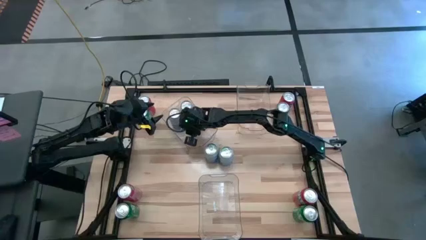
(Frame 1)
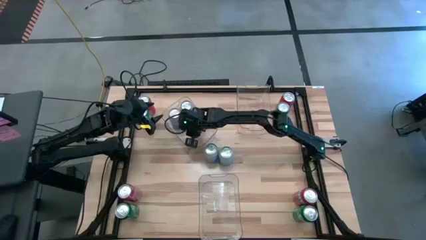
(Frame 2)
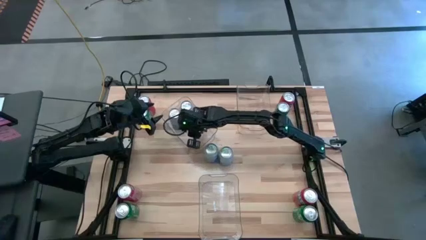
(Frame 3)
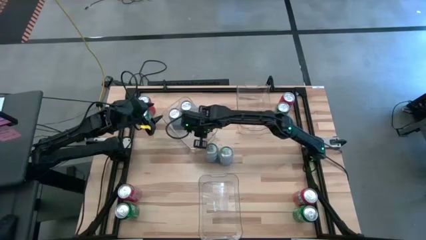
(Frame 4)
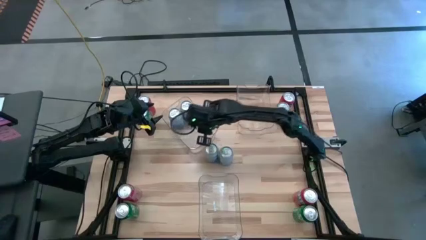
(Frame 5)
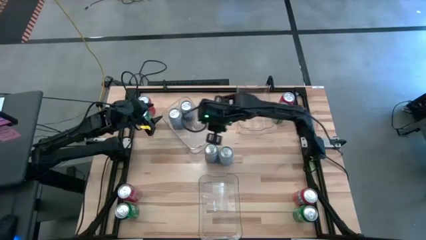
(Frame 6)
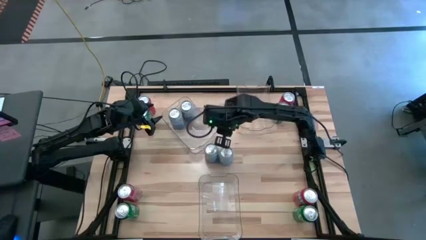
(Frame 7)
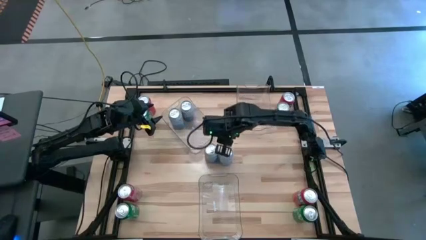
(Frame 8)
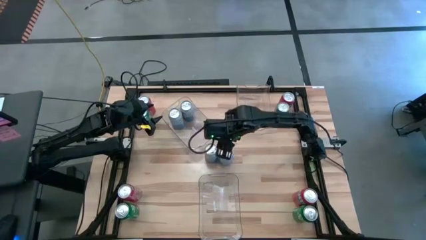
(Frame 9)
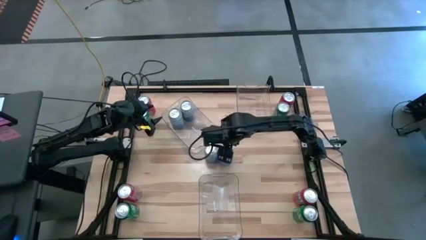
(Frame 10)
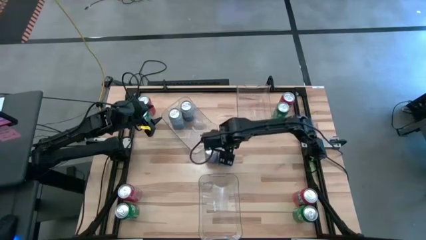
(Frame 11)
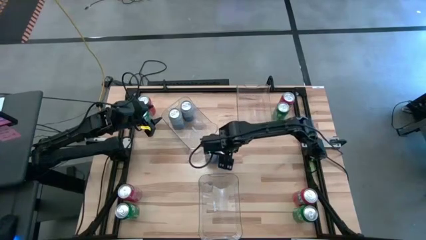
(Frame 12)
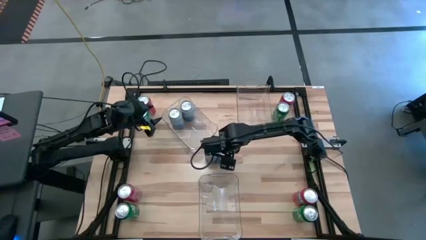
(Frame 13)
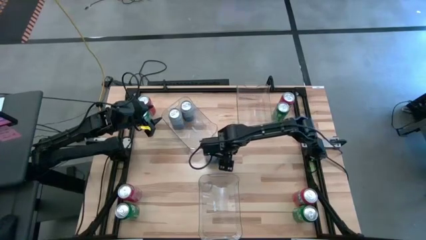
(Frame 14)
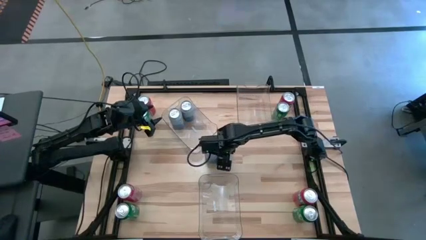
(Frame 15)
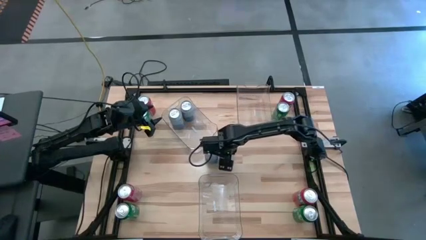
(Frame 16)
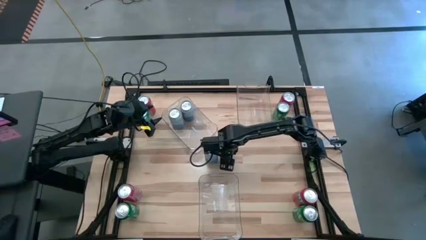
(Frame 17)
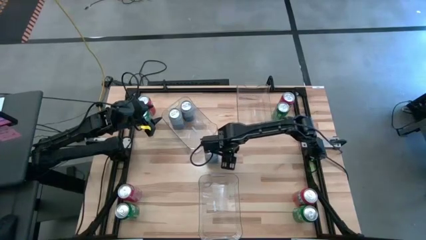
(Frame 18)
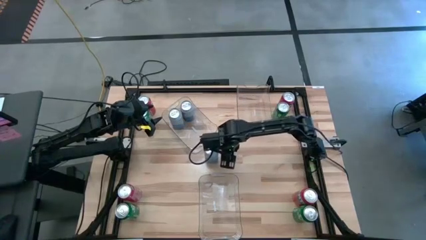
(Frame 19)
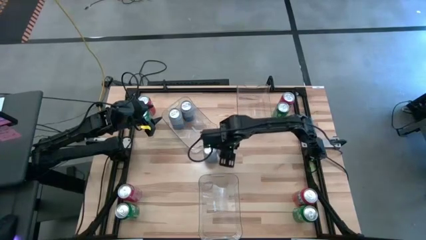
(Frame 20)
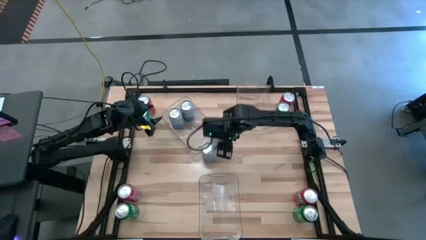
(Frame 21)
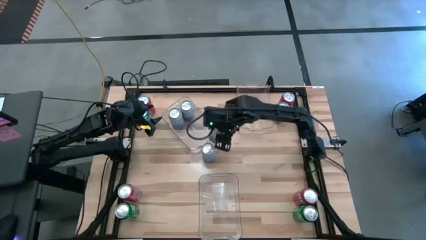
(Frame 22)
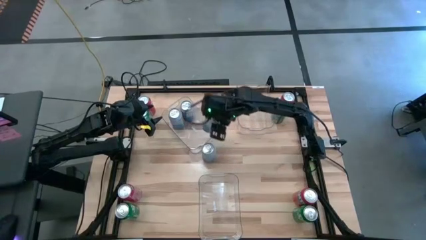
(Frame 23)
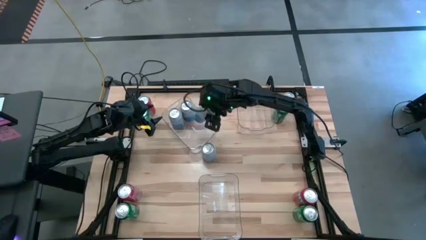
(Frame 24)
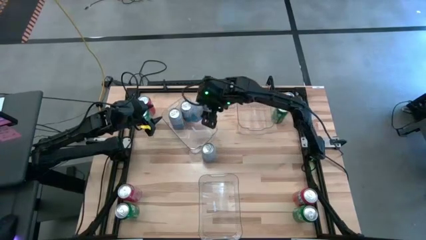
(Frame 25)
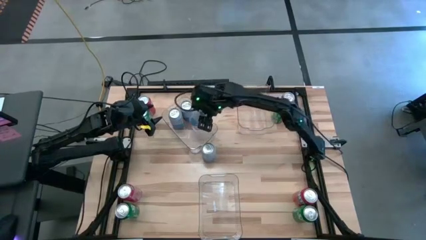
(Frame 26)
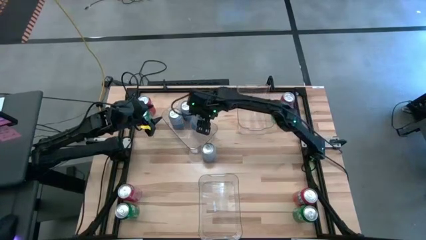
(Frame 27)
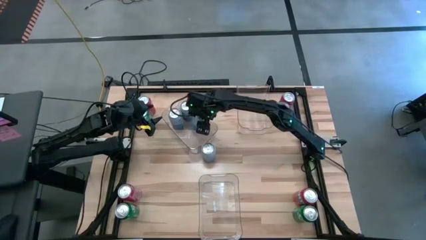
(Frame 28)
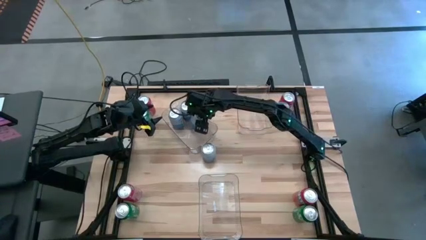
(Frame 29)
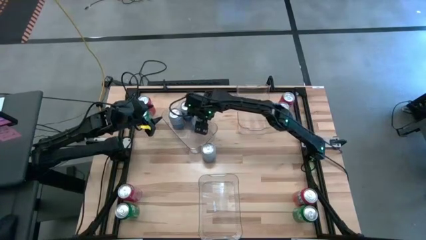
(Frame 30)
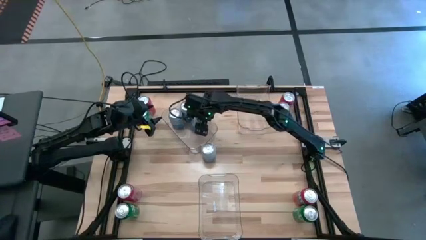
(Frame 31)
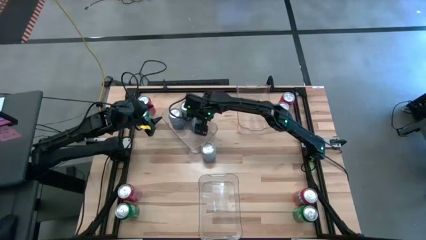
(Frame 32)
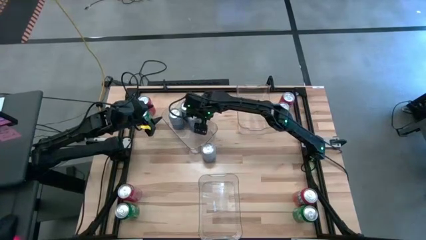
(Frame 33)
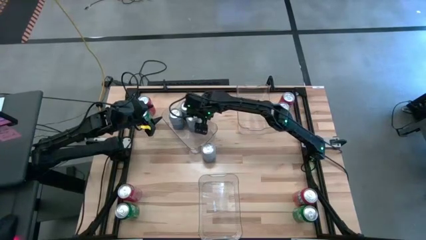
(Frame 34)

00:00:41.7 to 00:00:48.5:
Task: Sort soda cans
Put the right blue-white soda can into the top left transparent bin

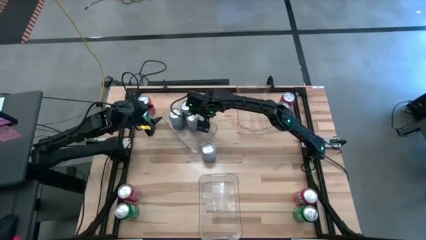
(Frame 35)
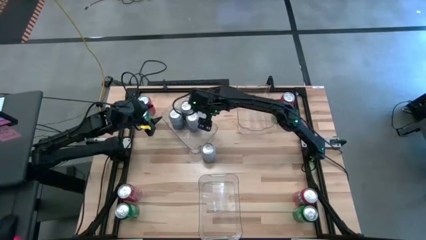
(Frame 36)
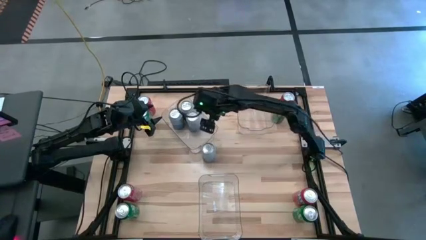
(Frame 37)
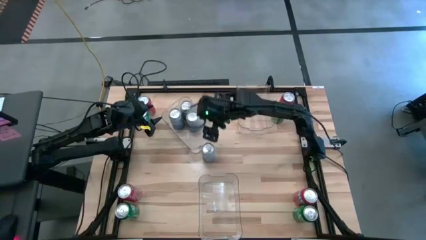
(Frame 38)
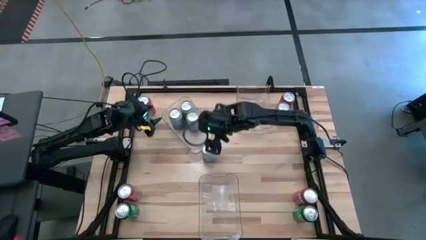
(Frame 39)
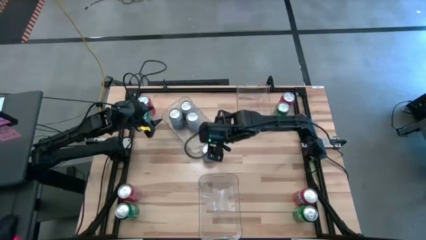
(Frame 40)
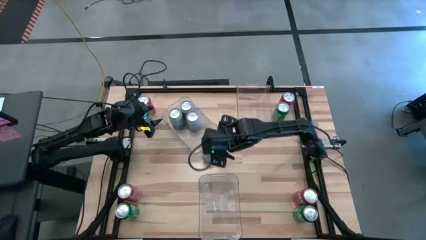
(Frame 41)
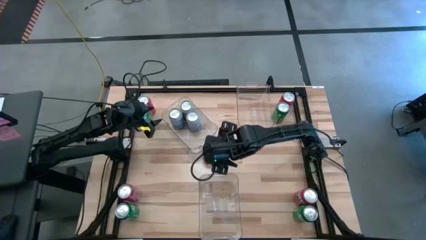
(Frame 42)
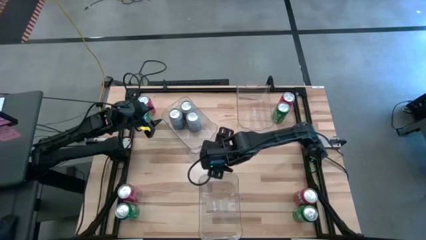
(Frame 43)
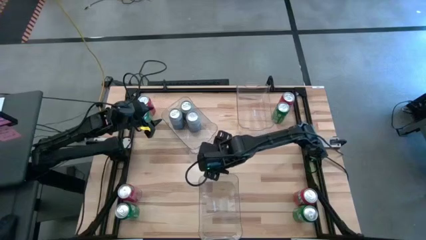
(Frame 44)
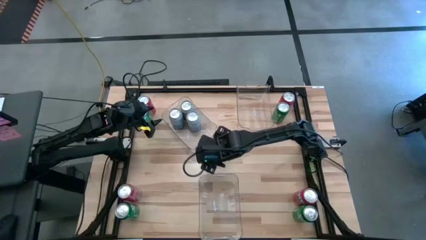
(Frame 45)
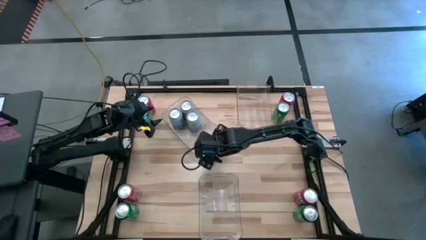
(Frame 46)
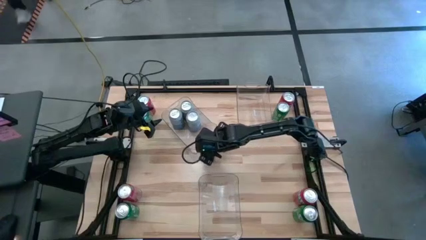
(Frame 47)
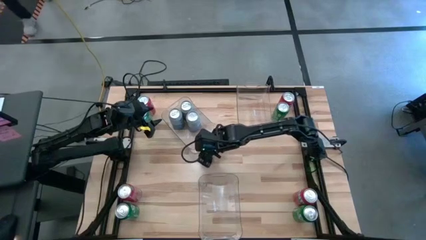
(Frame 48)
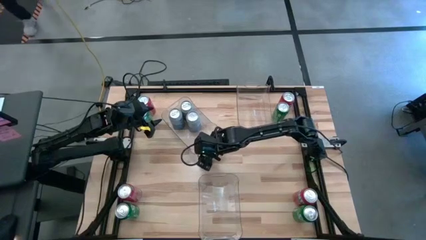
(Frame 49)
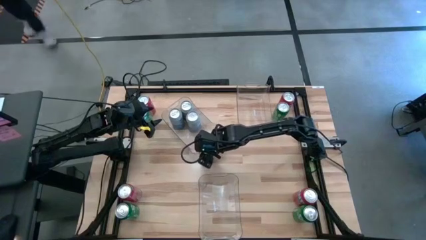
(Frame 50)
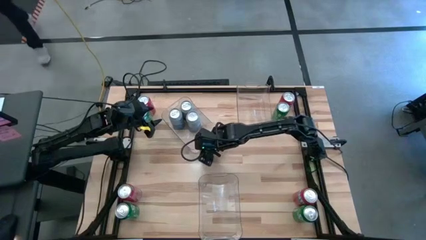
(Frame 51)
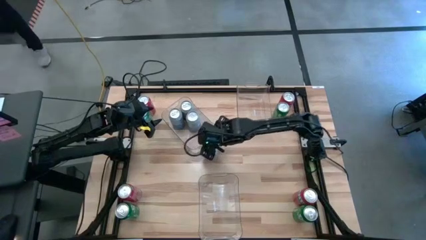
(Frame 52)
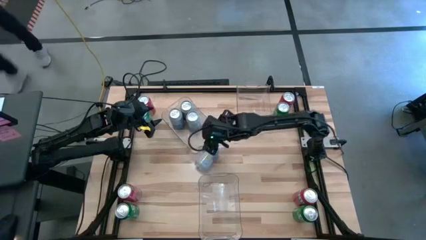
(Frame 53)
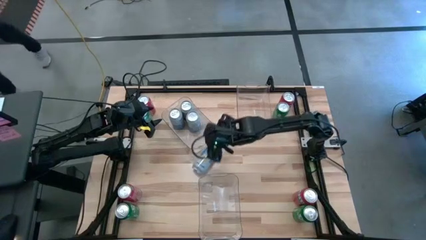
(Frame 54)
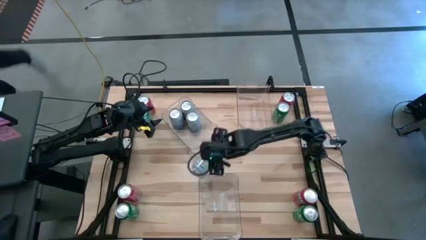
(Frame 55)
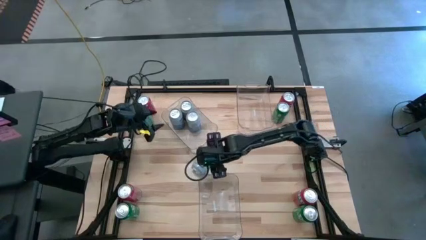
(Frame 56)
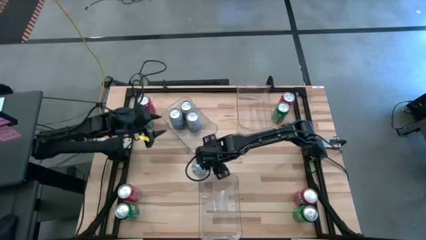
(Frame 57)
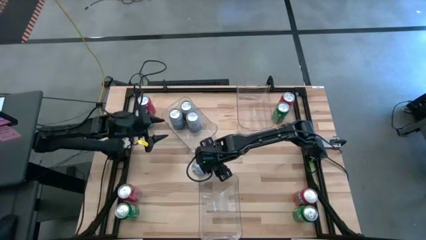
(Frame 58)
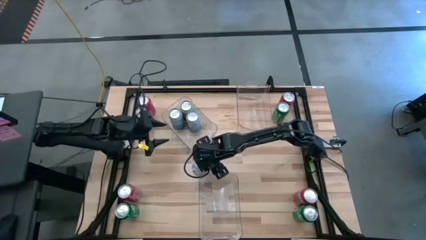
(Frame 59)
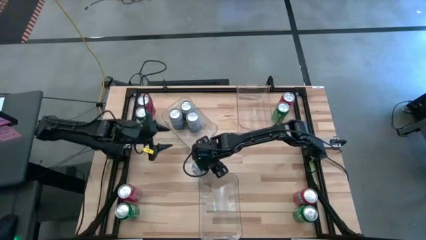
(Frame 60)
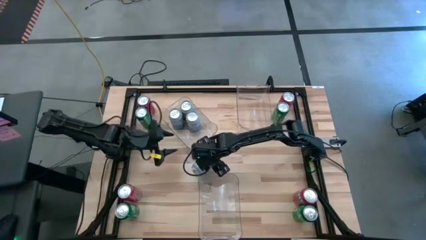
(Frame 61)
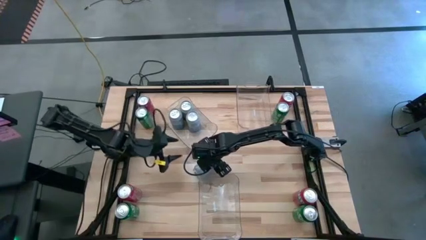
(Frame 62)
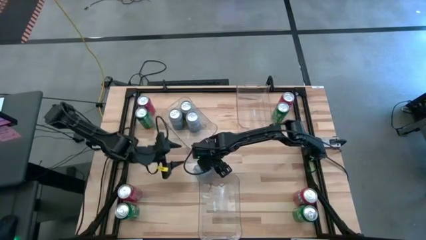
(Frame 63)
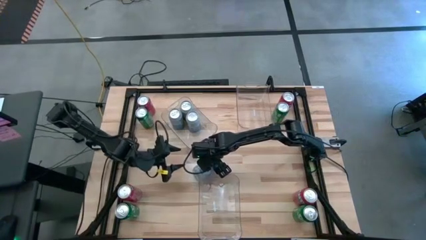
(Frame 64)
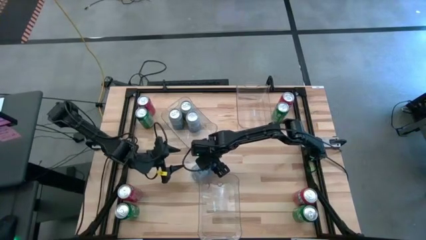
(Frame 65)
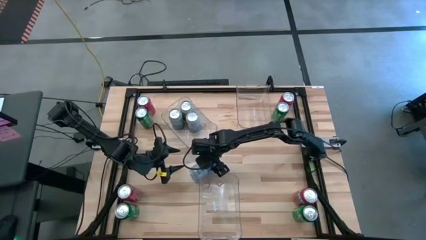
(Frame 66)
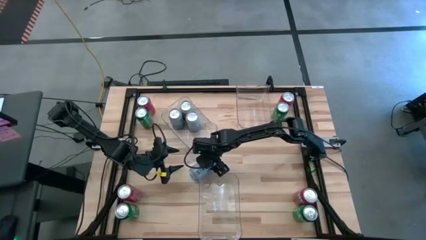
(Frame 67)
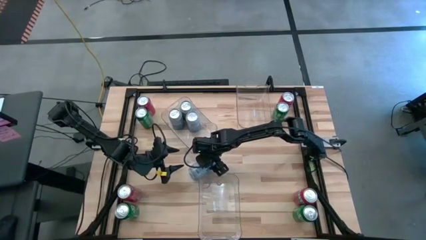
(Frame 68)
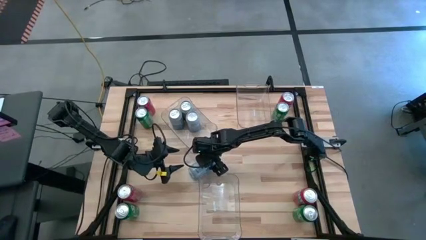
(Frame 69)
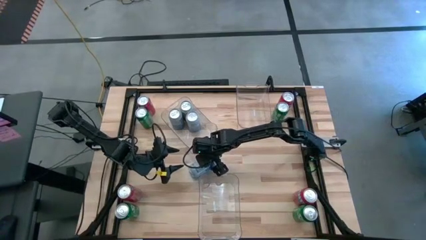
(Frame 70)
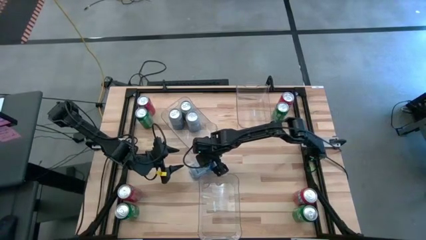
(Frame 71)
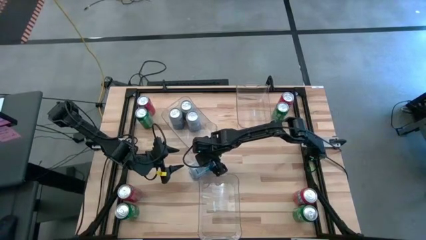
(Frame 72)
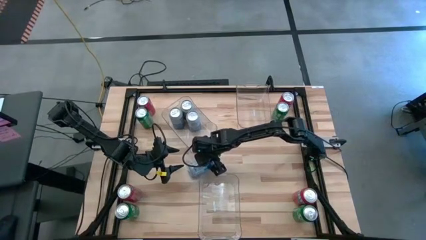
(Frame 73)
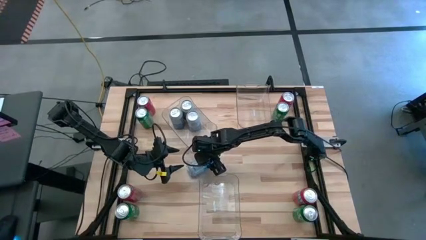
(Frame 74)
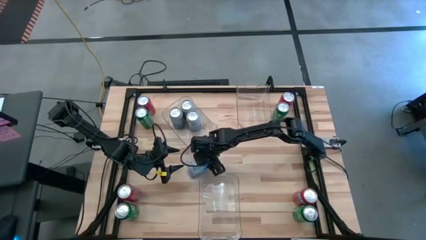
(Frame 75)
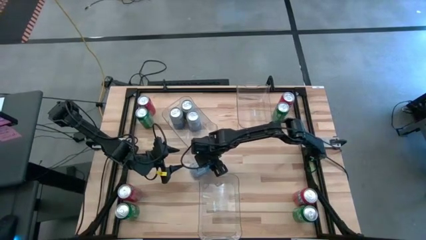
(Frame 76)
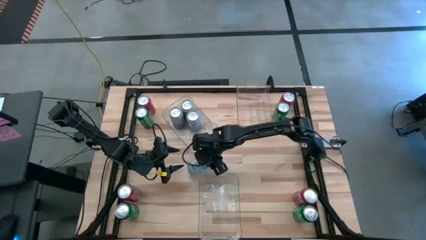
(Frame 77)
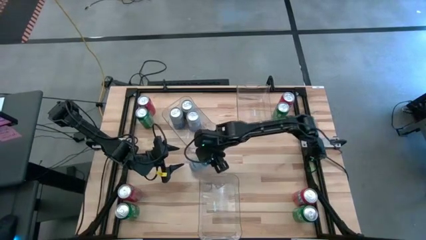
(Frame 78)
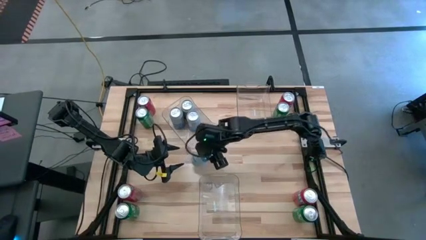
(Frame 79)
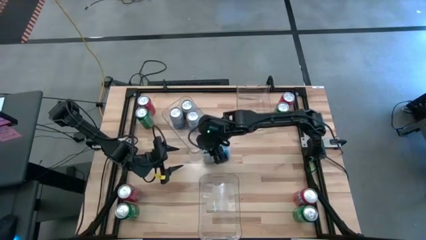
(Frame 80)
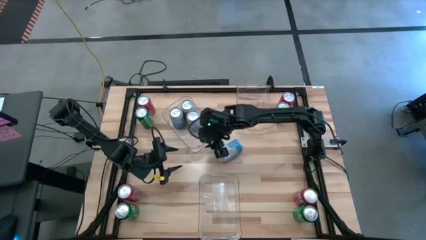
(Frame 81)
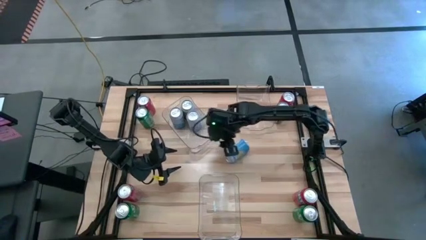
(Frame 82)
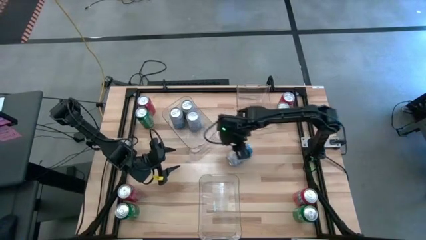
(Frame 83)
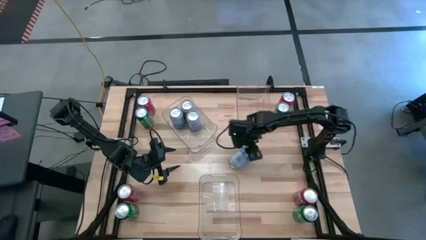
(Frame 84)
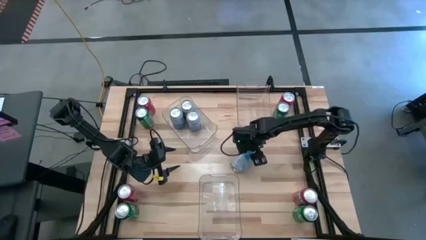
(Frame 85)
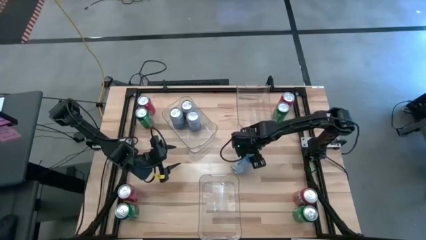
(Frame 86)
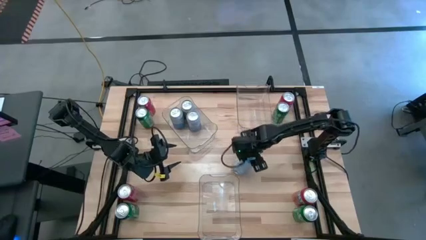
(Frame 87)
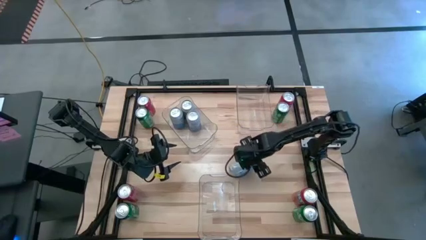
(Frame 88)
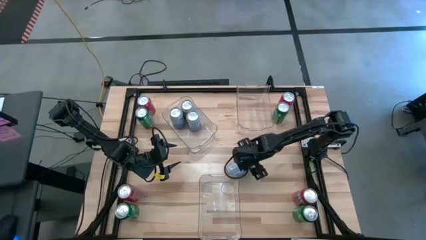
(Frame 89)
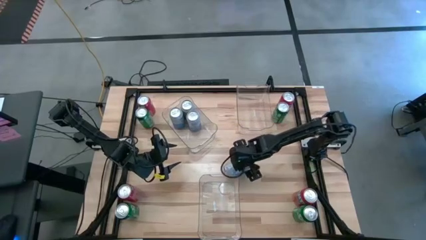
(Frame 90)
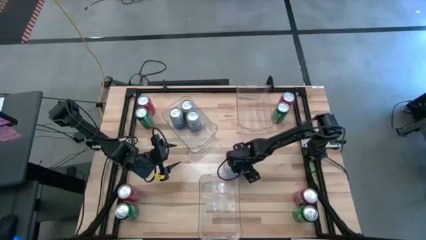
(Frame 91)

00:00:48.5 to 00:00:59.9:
Put the blue-white soda can into the top left transparent bin
